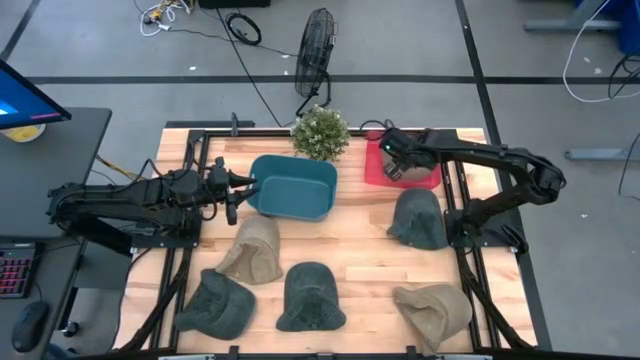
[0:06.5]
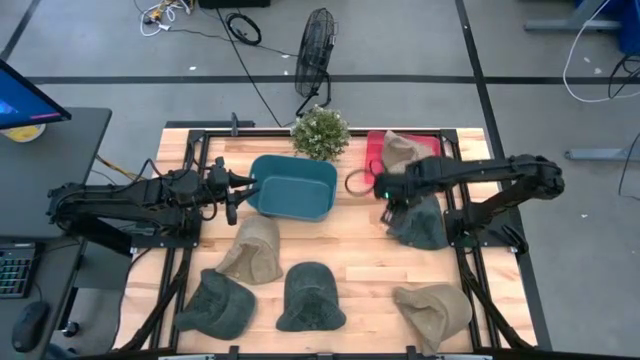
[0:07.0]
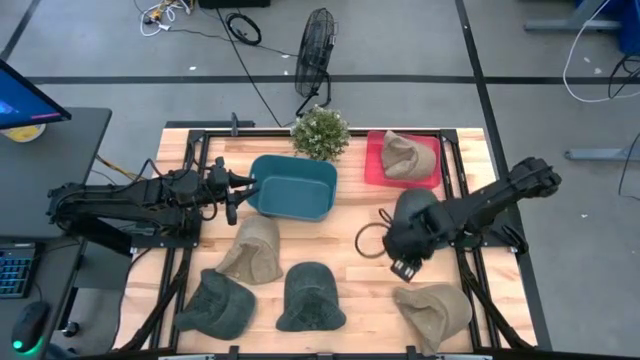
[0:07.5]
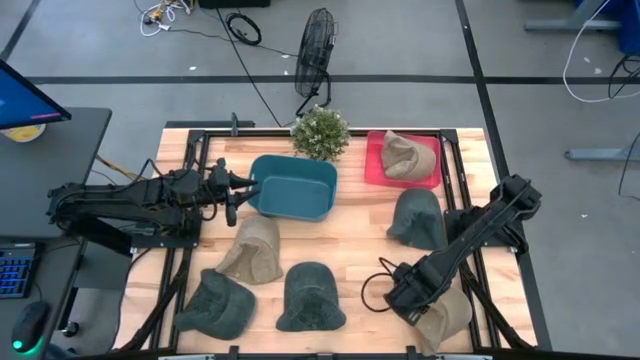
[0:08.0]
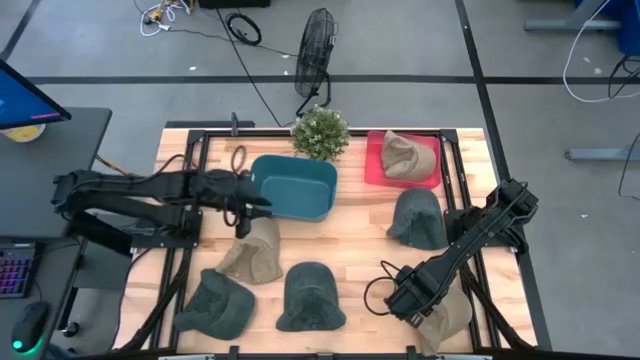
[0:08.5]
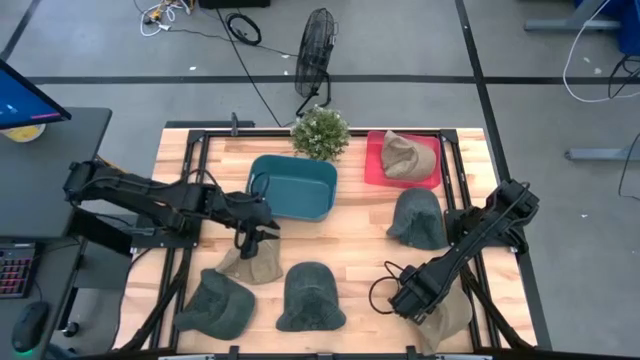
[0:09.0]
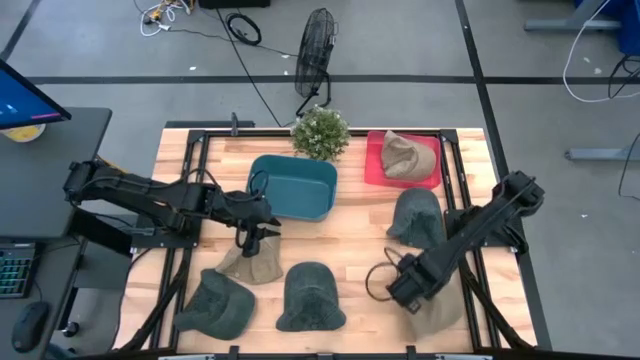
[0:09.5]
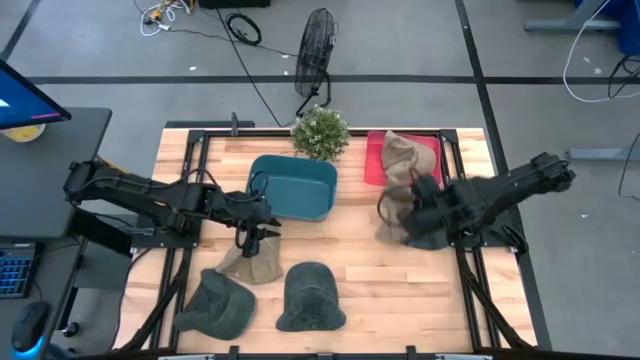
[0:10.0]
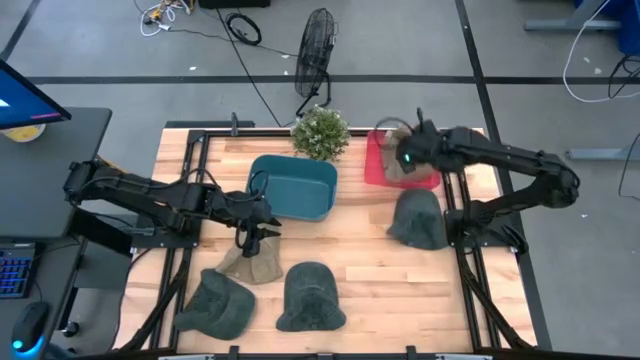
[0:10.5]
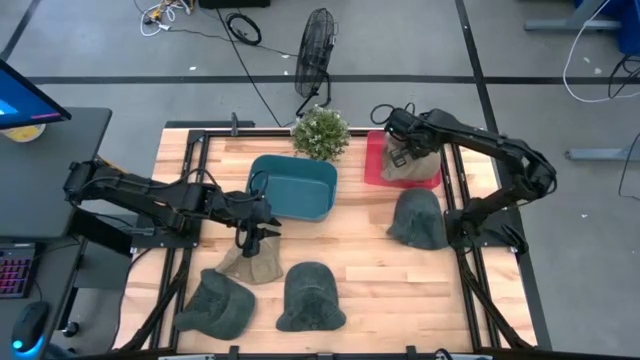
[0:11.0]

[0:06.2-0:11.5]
Task: Pick & Place hat
Put the bottom brown cap into the red bin

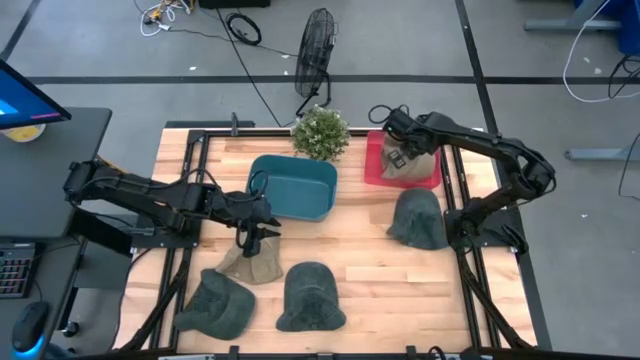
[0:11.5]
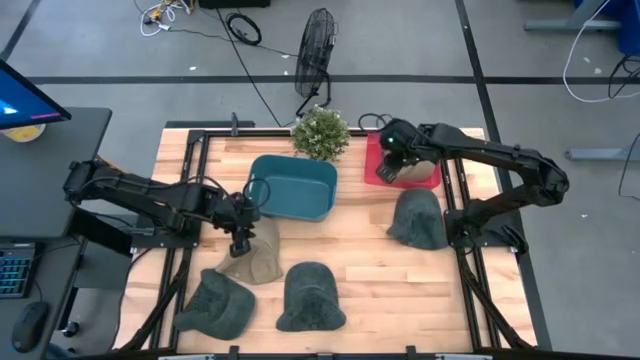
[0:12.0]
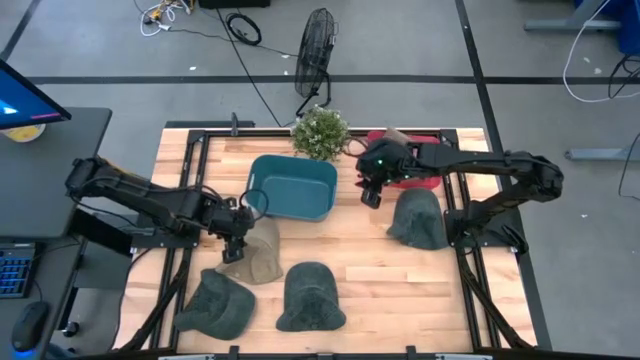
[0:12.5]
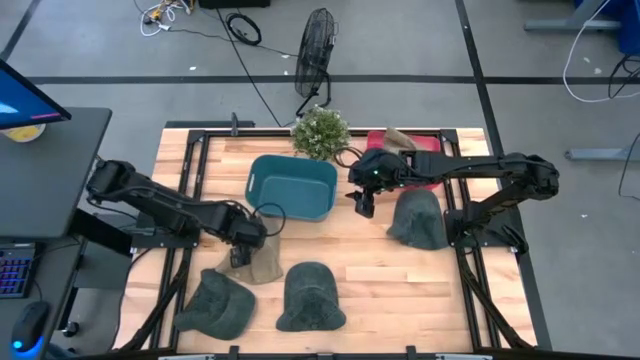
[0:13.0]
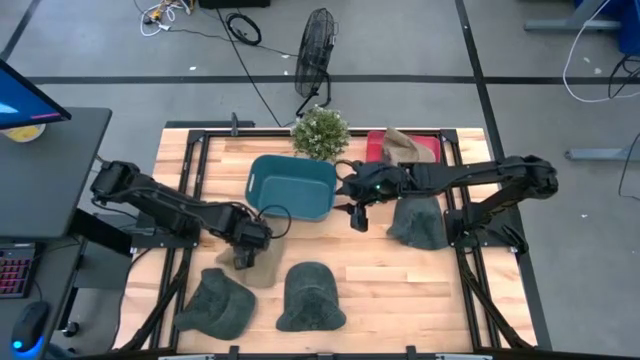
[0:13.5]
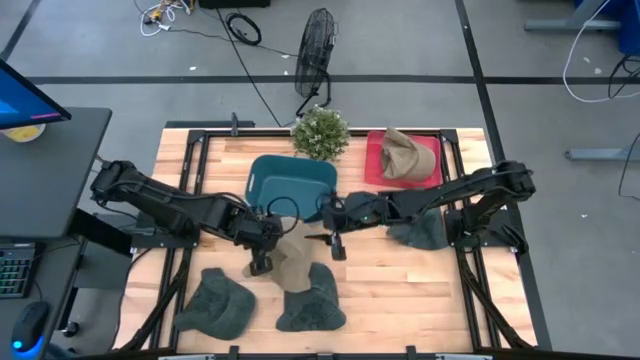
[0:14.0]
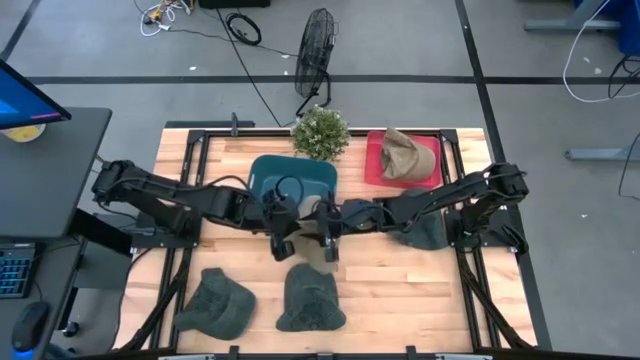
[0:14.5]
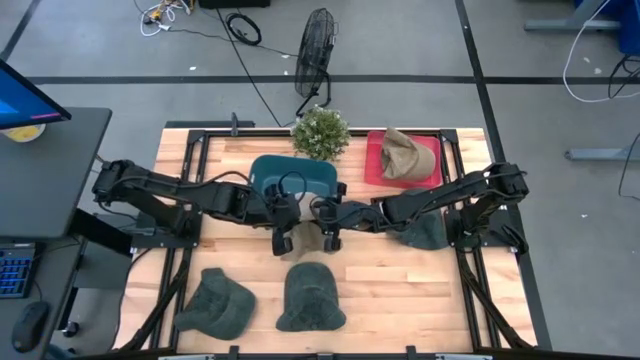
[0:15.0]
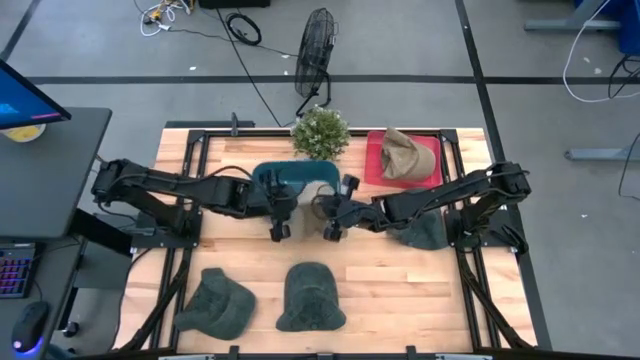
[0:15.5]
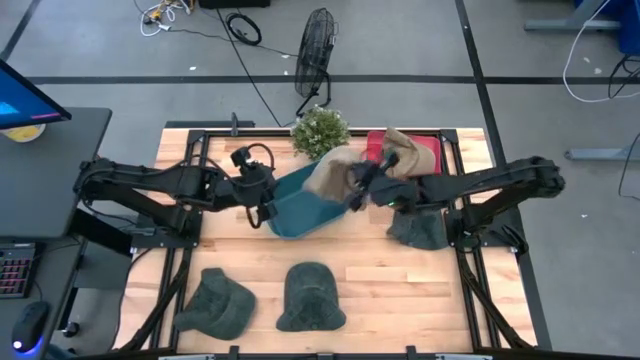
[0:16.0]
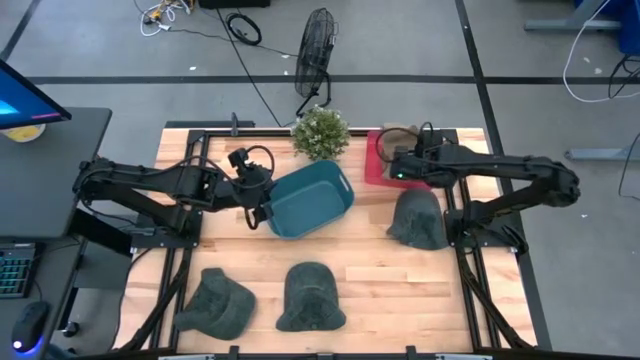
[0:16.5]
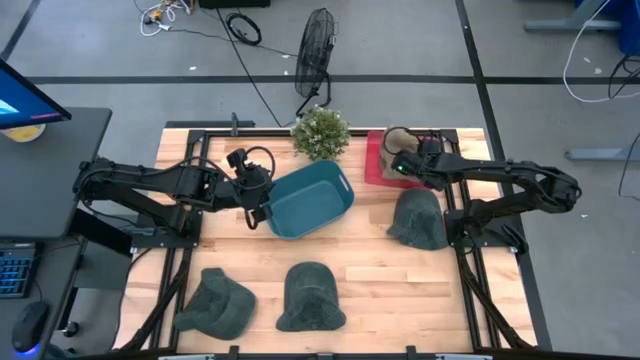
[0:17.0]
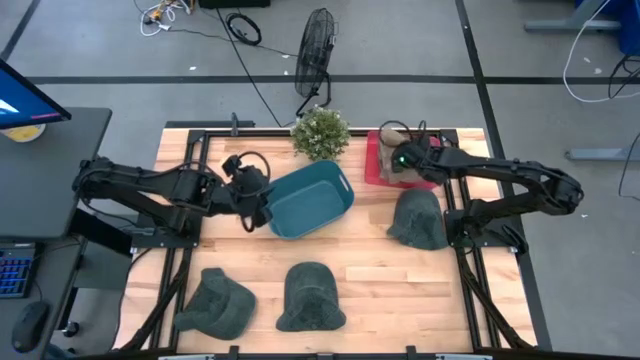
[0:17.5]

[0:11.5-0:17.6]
Put the brown cap into the red bin

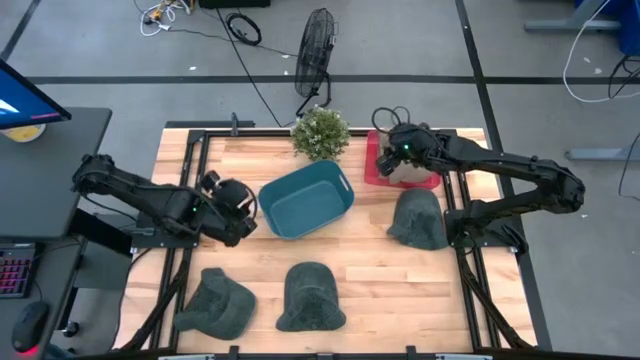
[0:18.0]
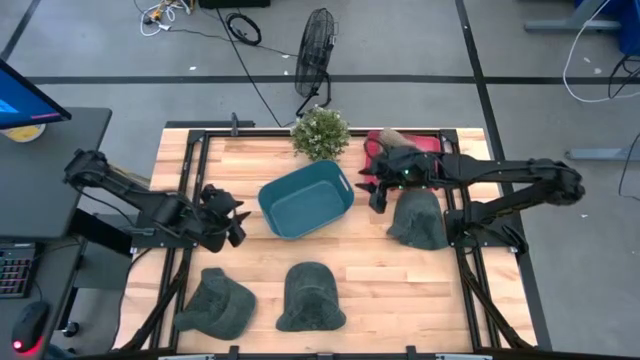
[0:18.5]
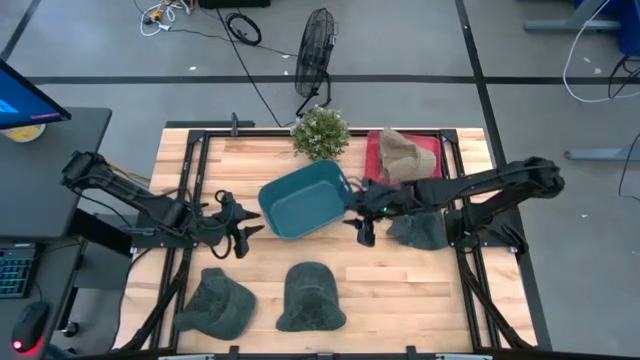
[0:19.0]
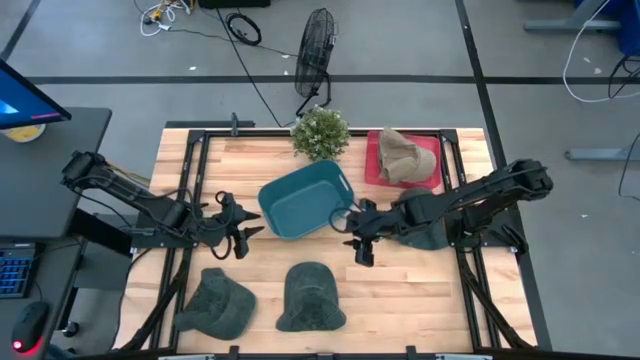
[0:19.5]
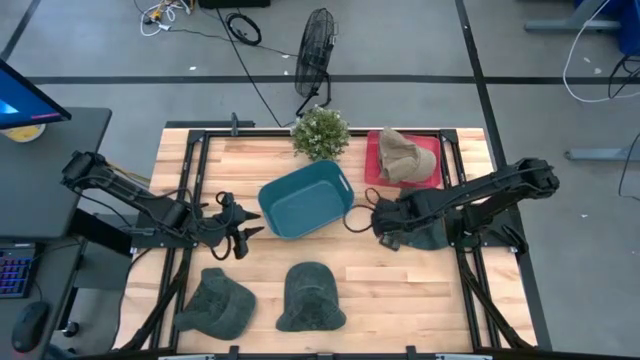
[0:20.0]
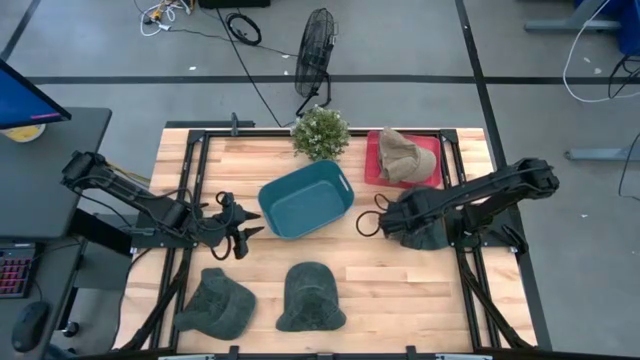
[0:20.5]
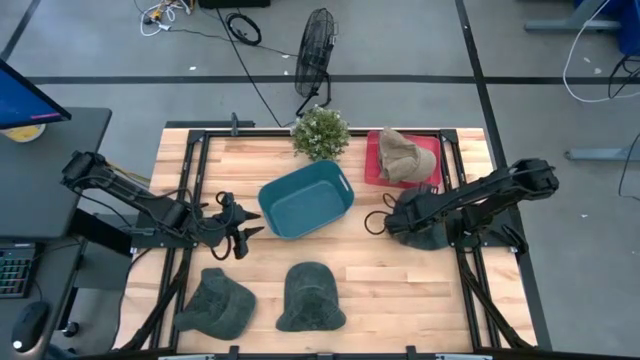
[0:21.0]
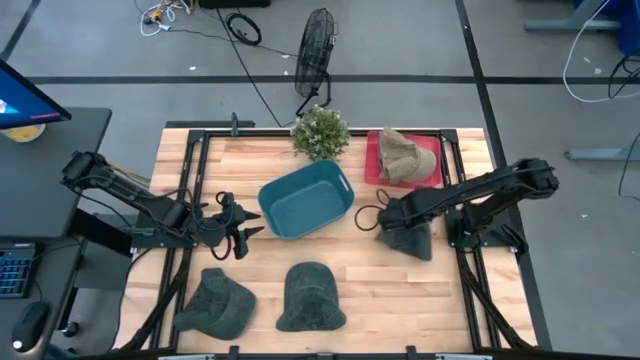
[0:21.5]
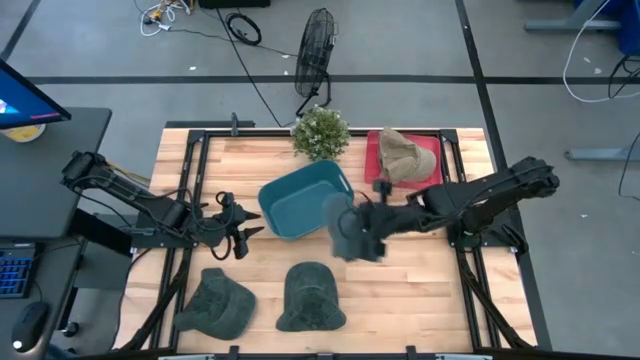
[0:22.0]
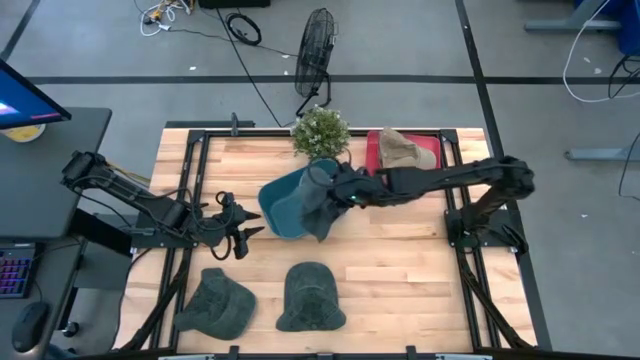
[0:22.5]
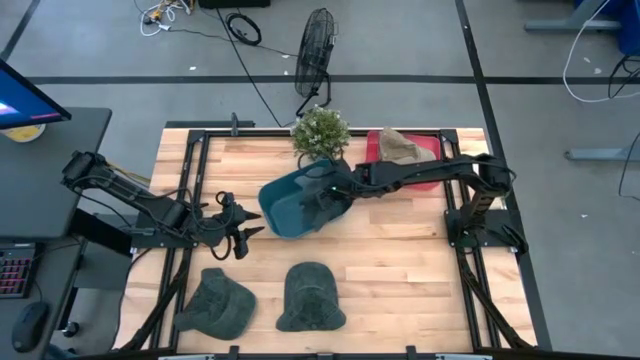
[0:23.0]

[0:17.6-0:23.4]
Put the top black cap into the blue bin

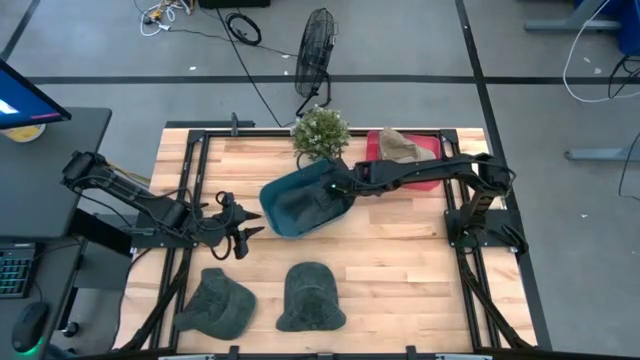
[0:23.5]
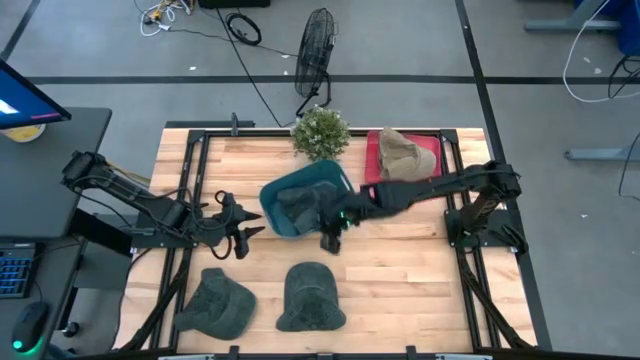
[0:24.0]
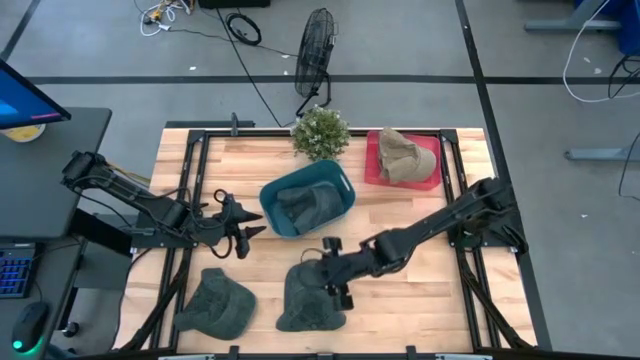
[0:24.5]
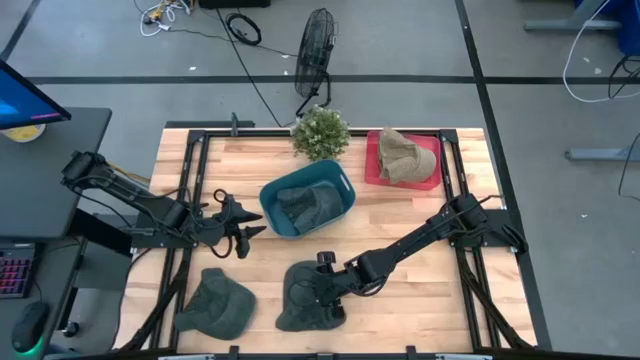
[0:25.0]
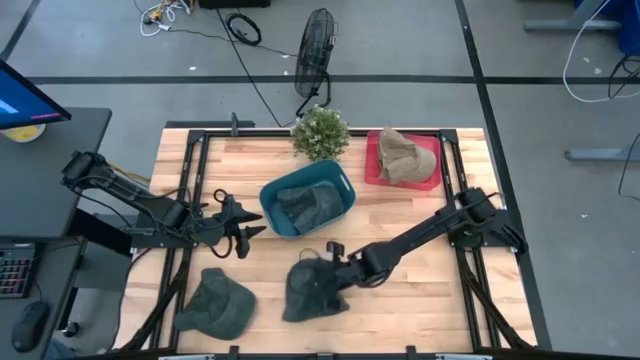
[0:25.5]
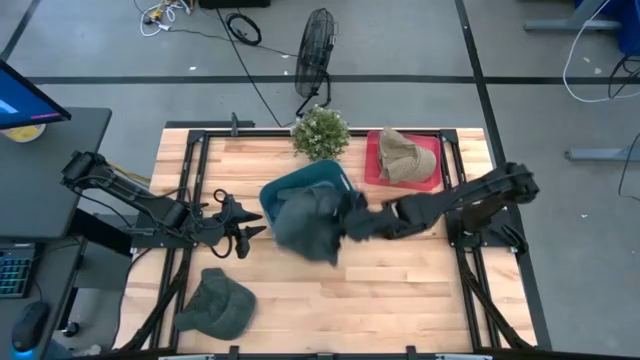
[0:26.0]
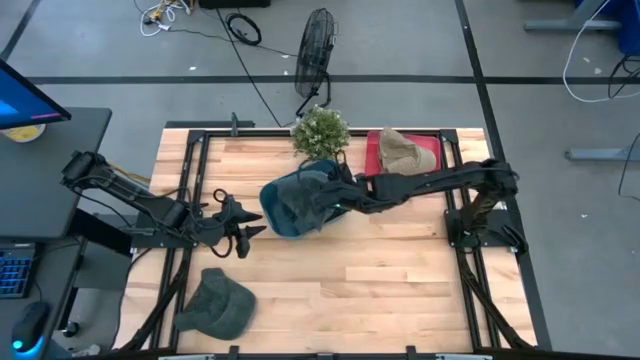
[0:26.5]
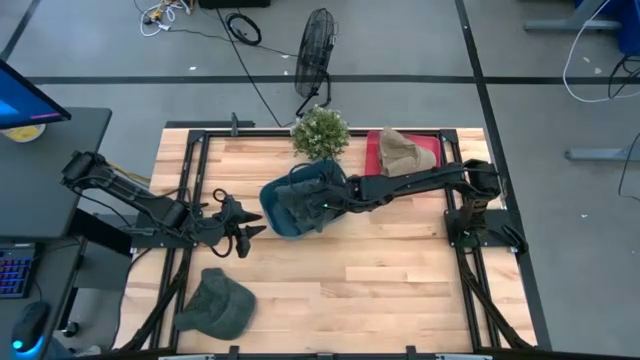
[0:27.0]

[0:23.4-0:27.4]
Put the right black cap into the blue bin
